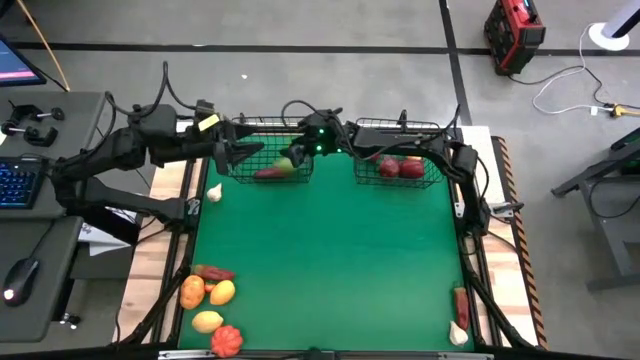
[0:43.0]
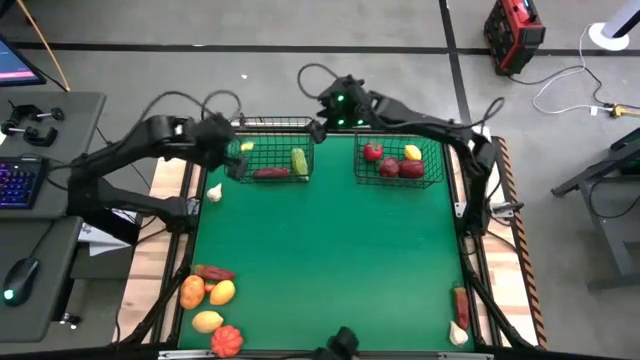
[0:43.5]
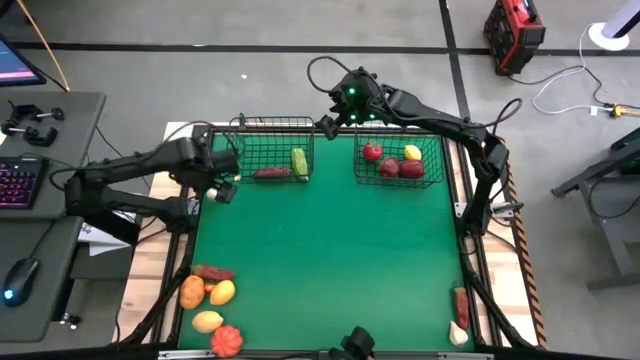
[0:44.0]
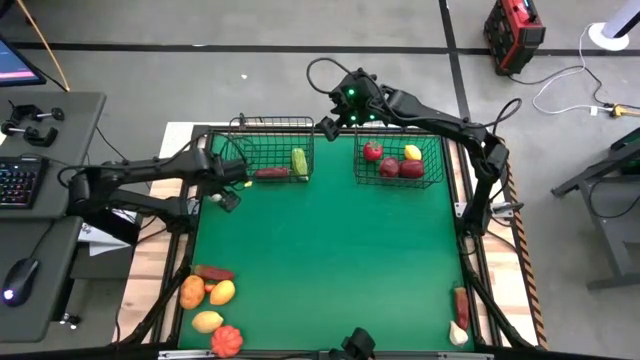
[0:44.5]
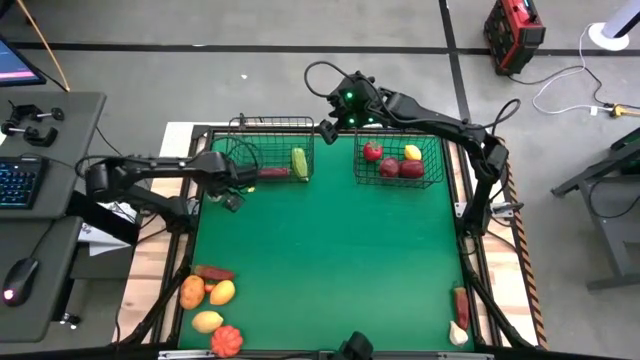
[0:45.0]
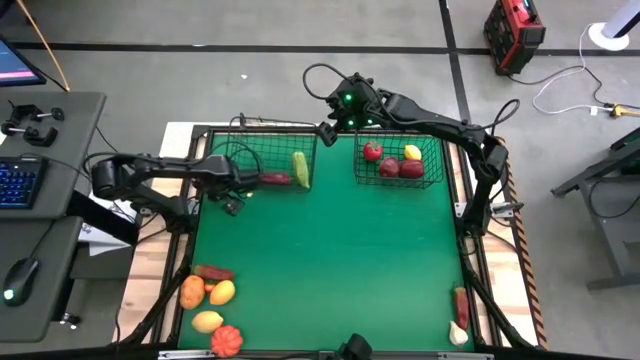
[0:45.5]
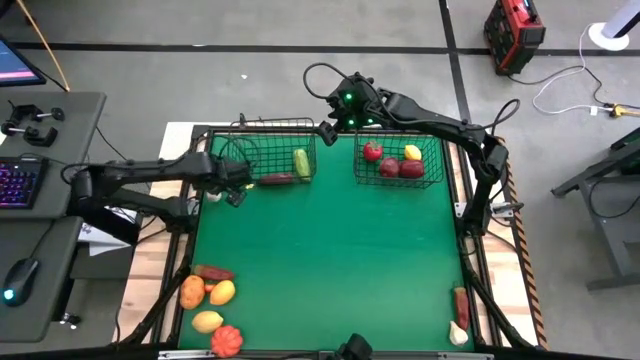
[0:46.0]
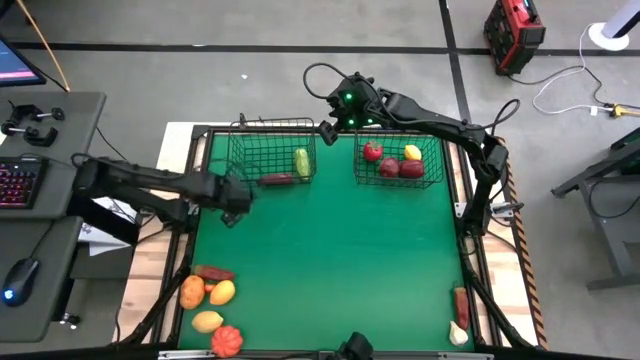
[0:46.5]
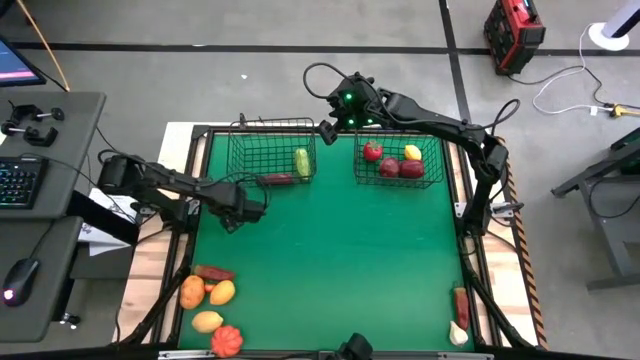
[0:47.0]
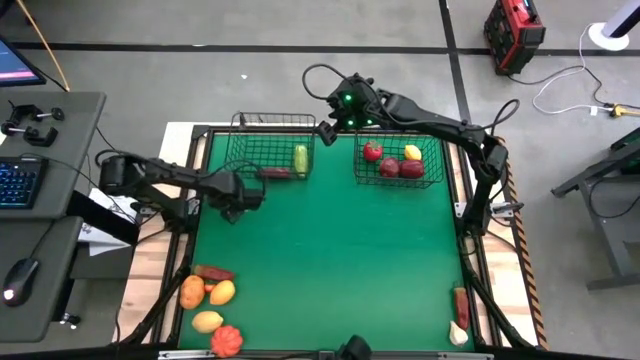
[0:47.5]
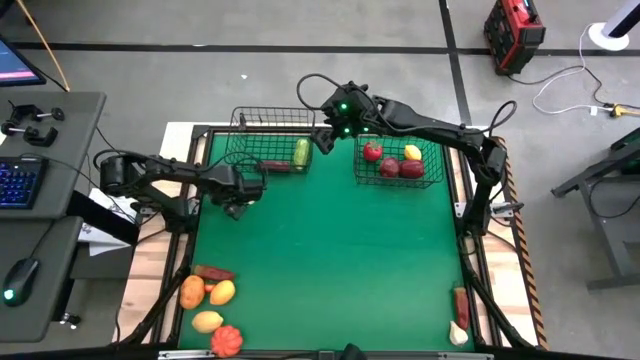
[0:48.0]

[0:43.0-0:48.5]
Task: Sort produce into baskets
Put the left white garlic into the left wire basket

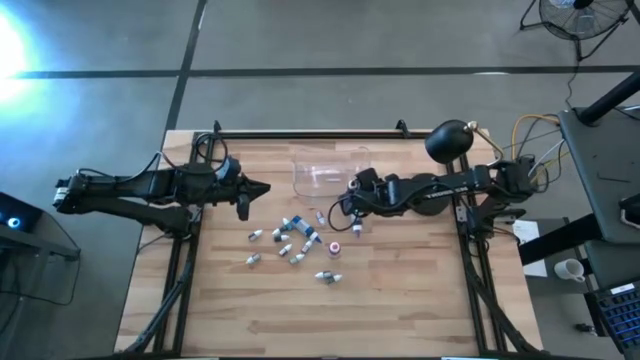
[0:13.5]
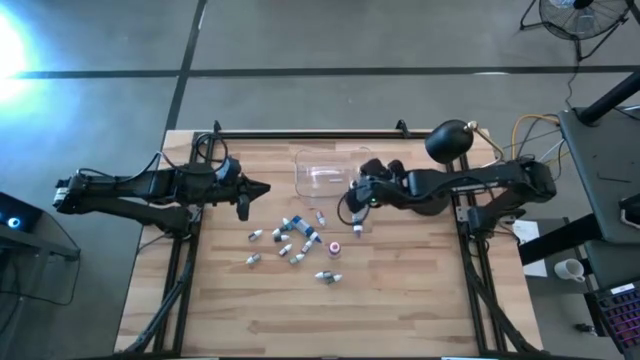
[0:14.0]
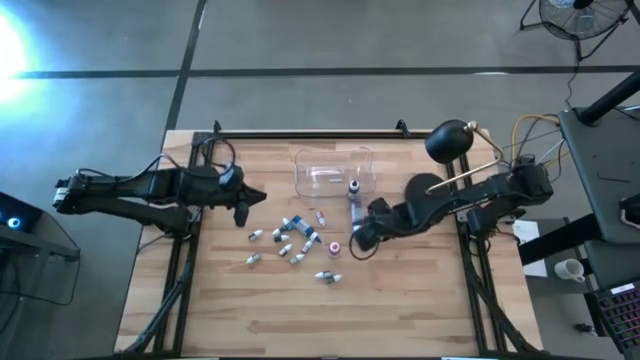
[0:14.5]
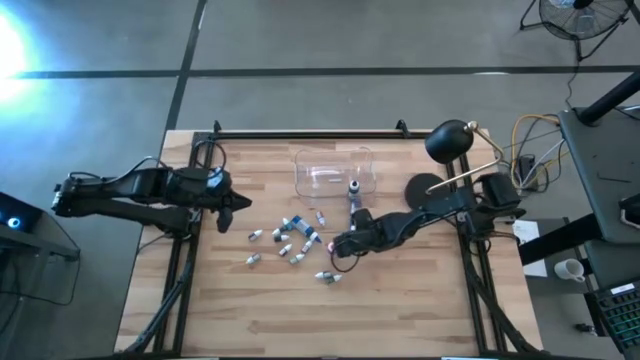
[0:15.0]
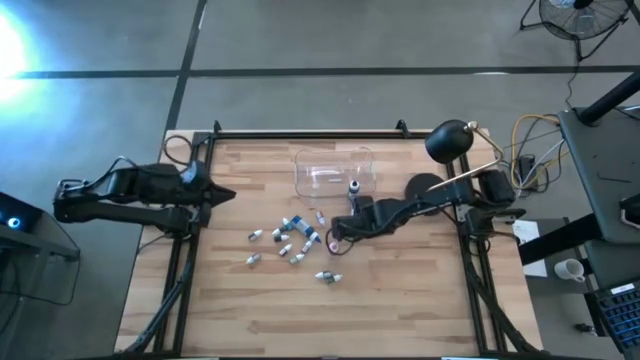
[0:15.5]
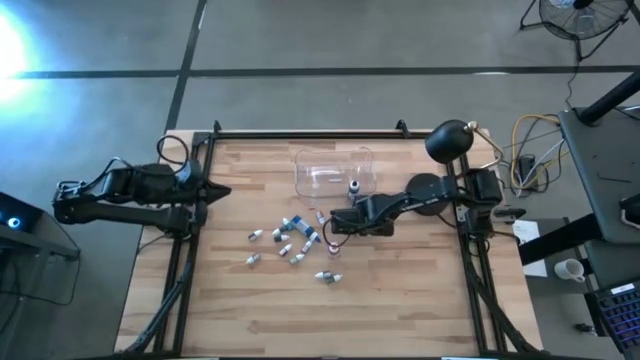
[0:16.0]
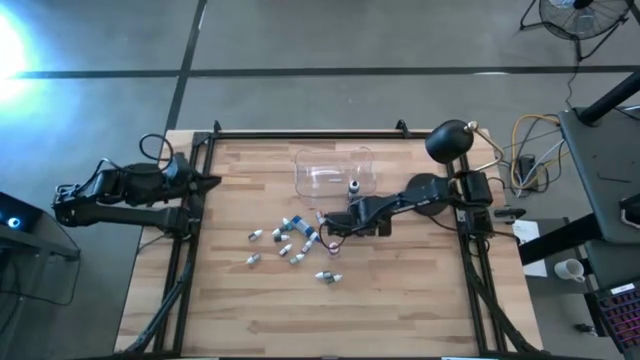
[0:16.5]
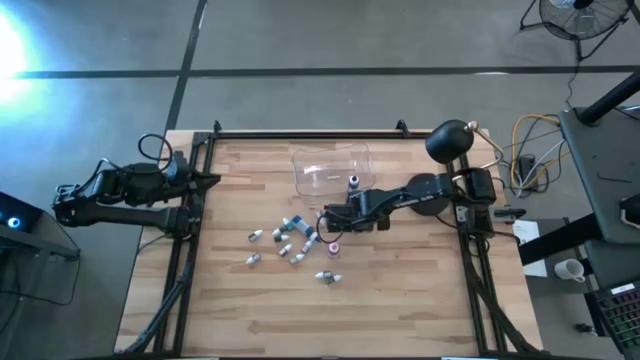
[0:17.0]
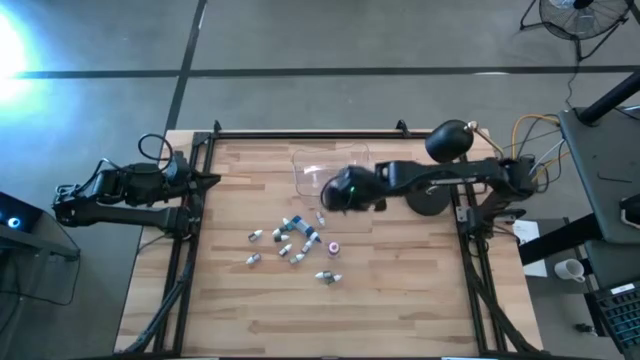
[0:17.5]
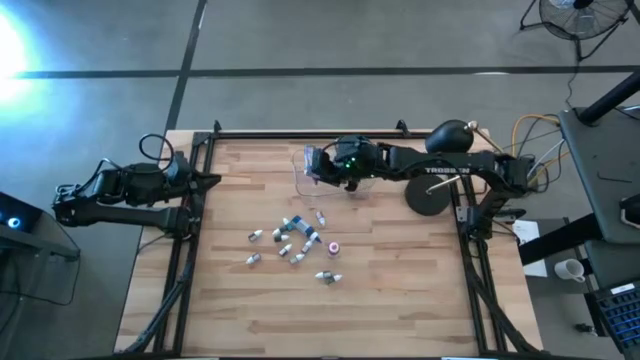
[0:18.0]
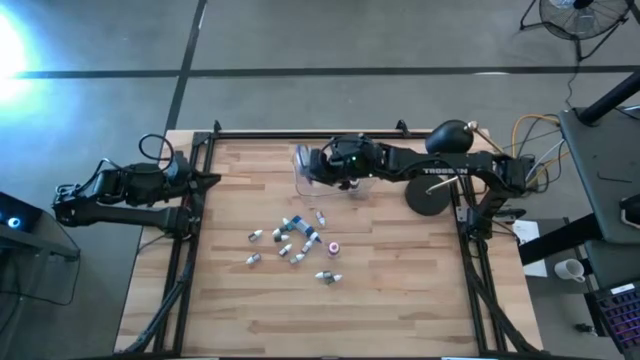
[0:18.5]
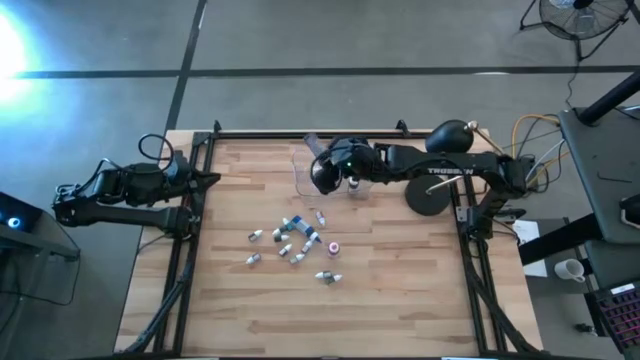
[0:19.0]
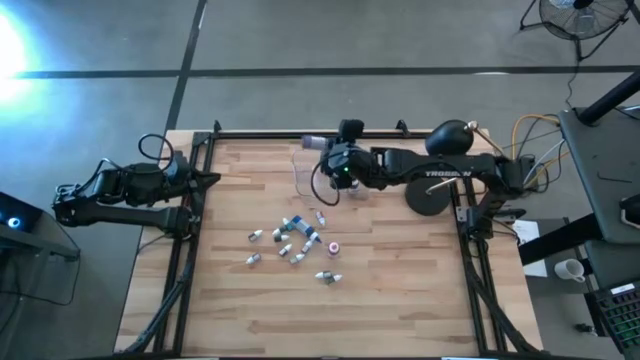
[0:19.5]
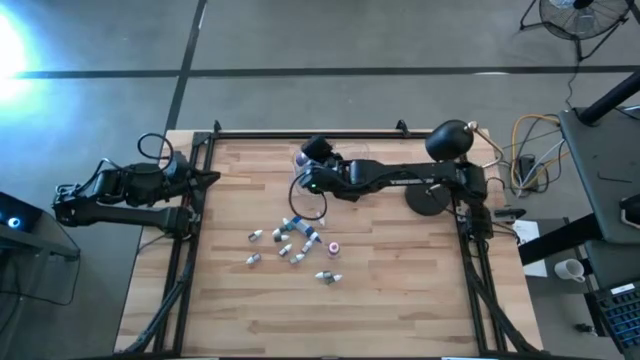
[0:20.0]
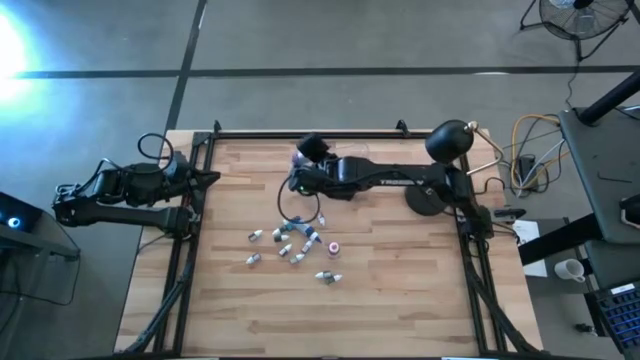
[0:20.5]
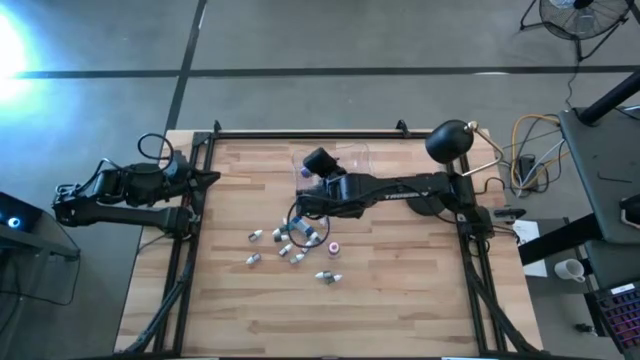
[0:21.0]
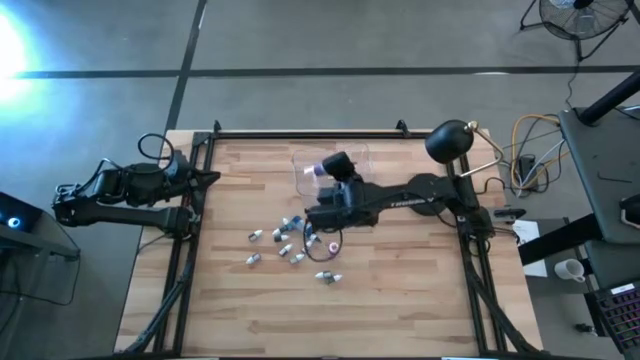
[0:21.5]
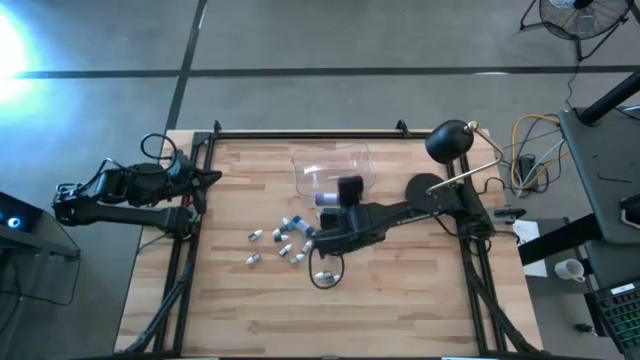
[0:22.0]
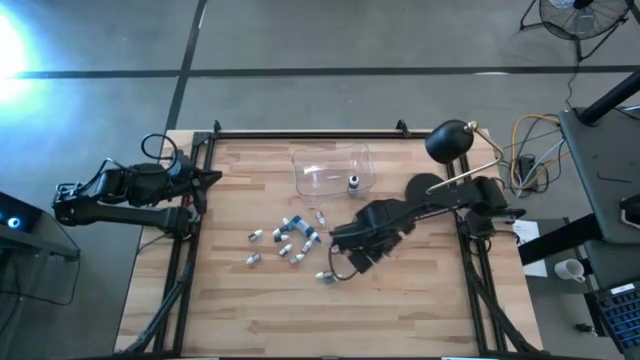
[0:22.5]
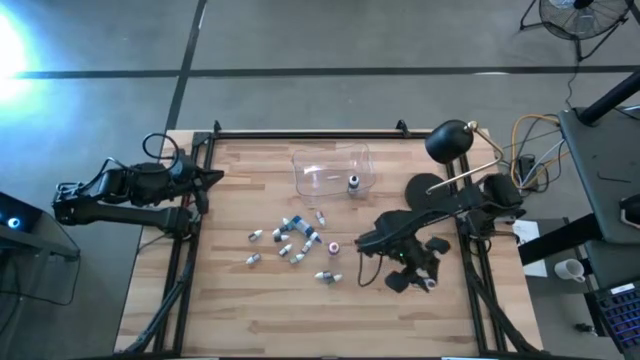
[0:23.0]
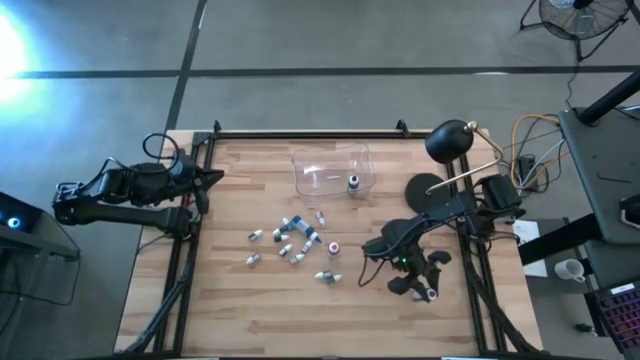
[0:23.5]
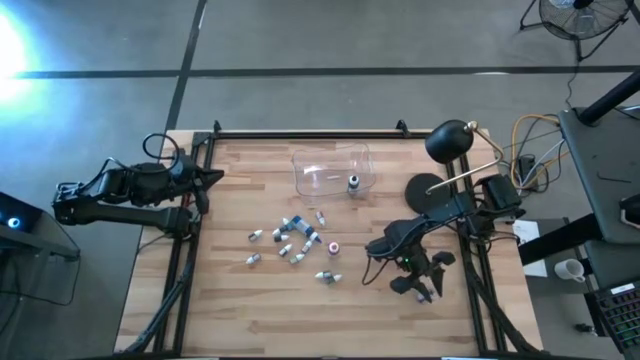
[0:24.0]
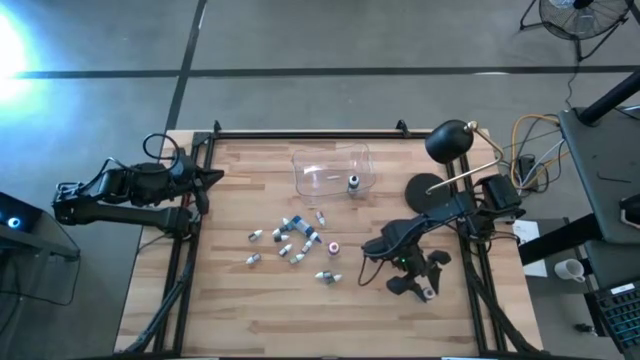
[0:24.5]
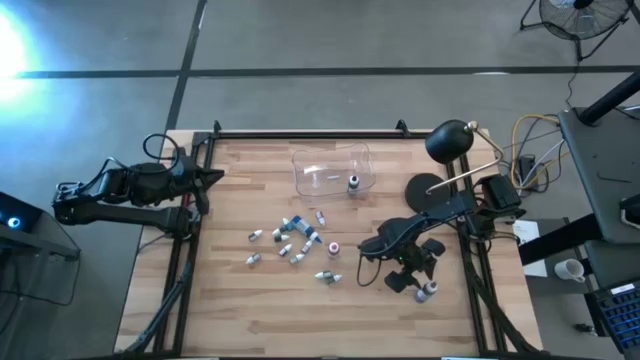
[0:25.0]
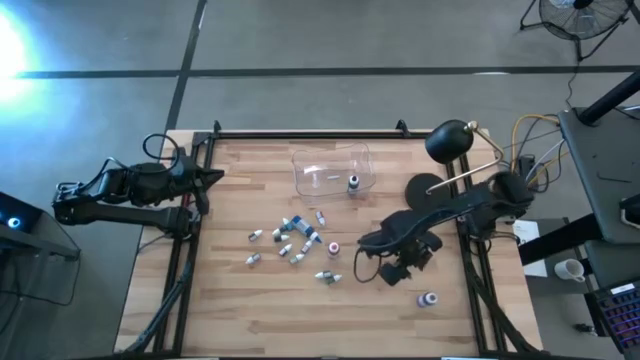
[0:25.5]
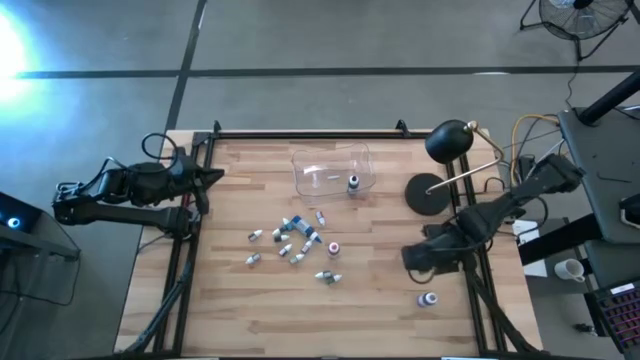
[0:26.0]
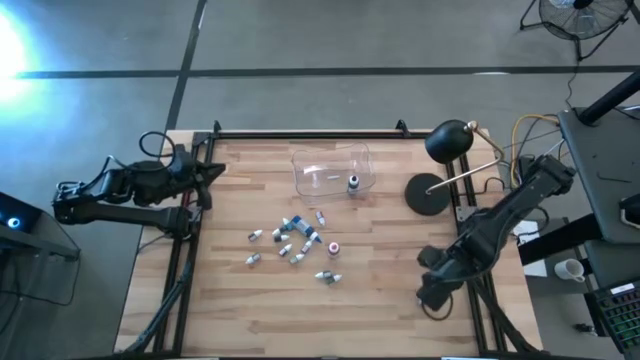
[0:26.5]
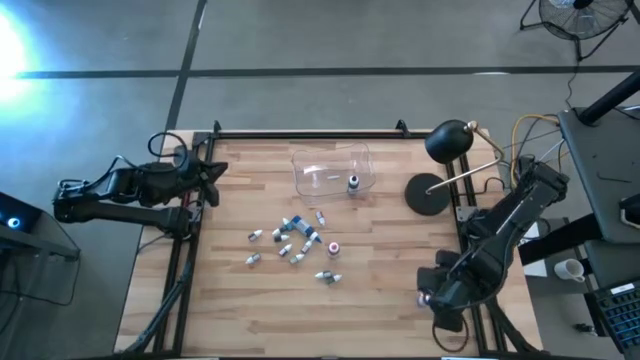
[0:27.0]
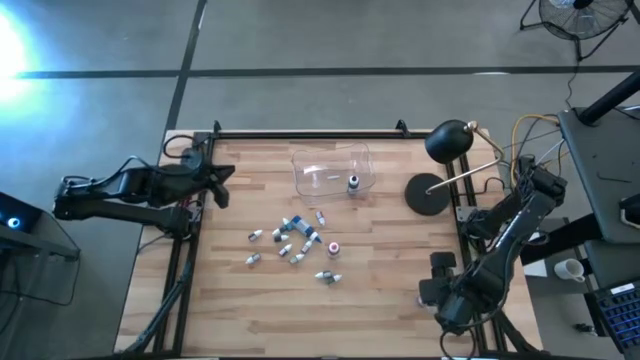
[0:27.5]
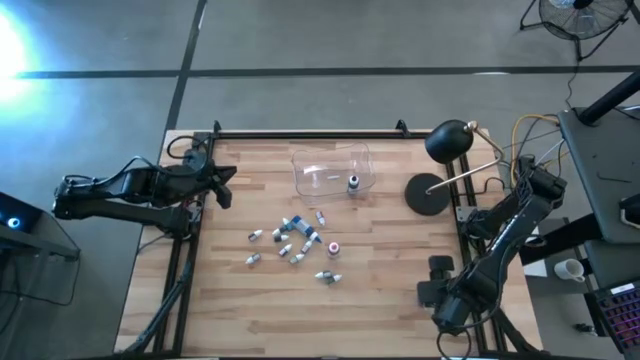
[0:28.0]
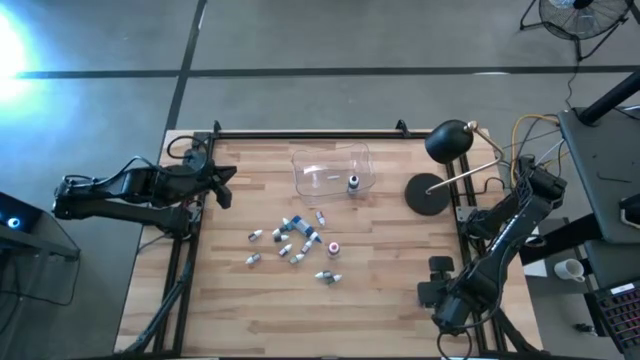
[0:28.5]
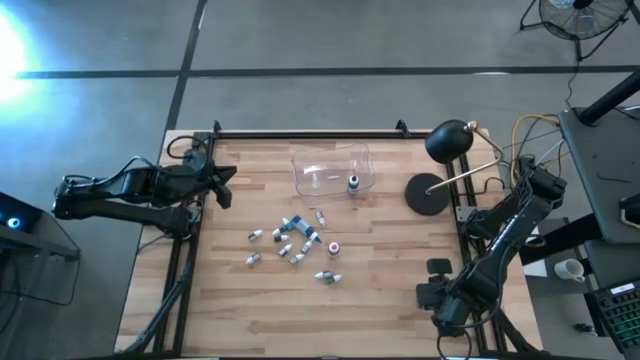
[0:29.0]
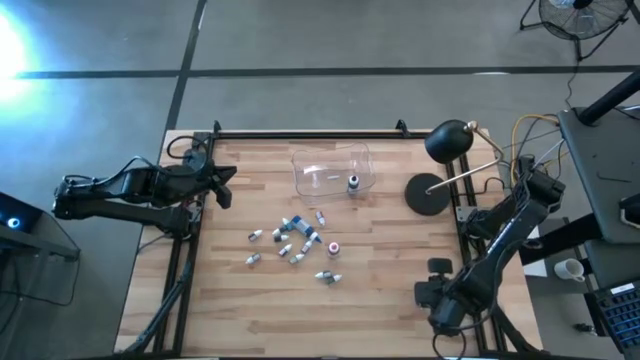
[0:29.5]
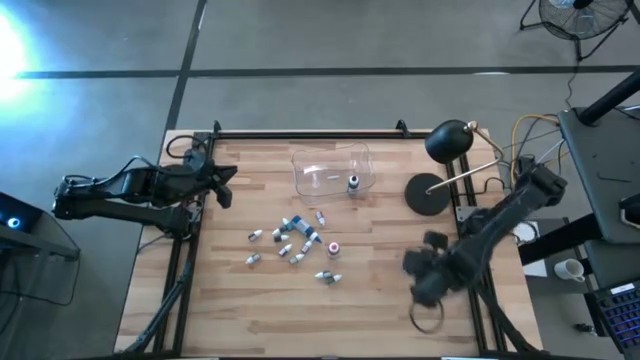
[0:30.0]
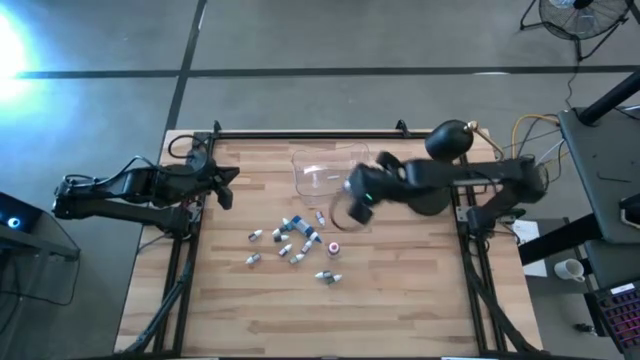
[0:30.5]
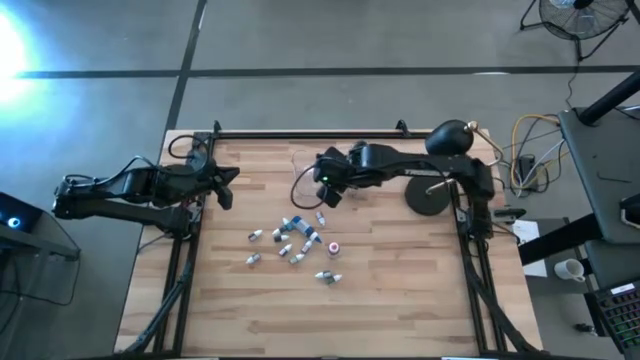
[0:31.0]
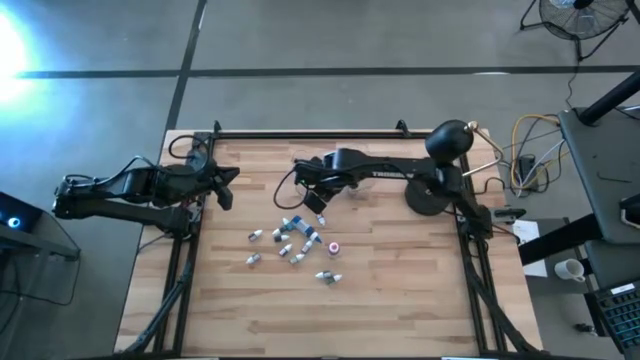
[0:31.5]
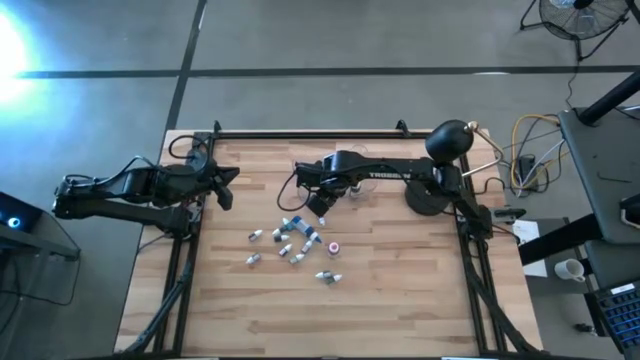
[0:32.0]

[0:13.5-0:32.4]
Task: Pick & Place food coloring
Put the large purple food coloring bottle into the transparent bin
